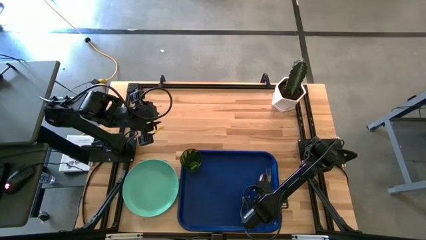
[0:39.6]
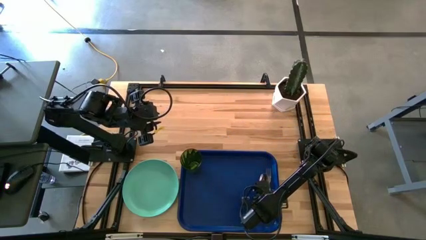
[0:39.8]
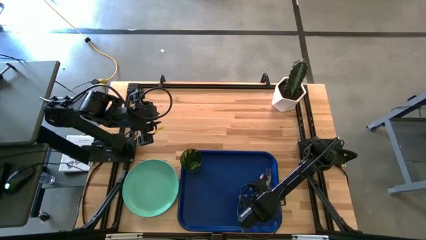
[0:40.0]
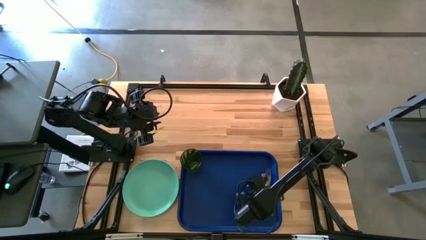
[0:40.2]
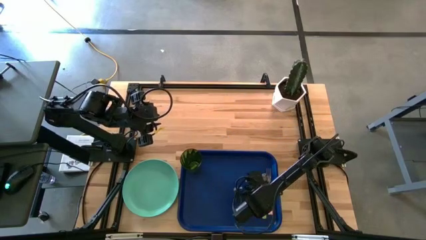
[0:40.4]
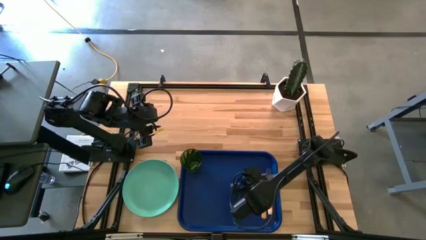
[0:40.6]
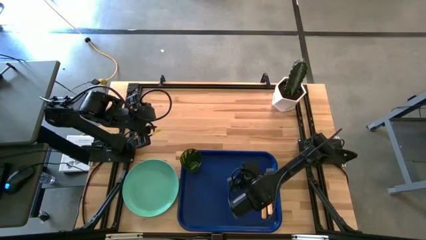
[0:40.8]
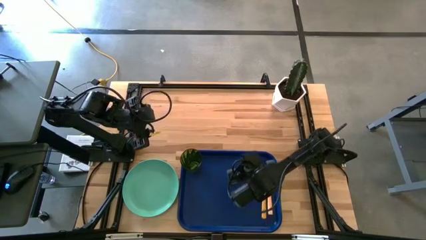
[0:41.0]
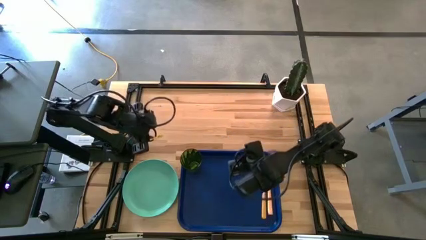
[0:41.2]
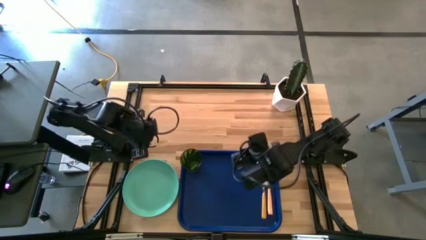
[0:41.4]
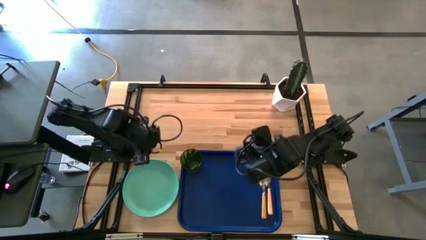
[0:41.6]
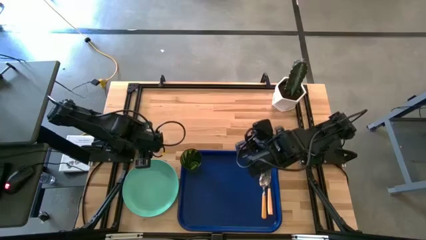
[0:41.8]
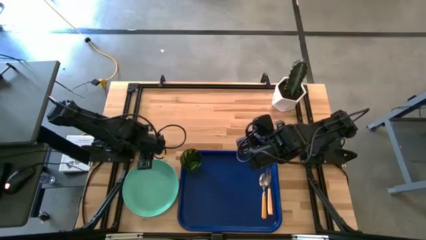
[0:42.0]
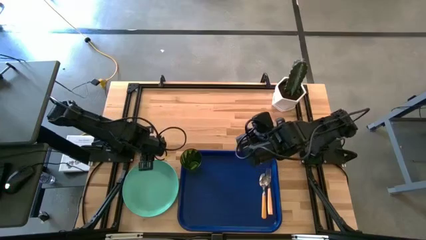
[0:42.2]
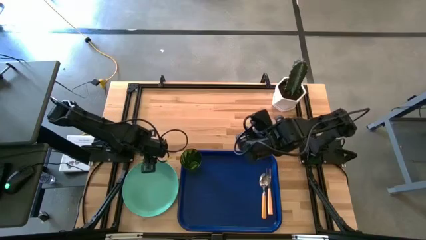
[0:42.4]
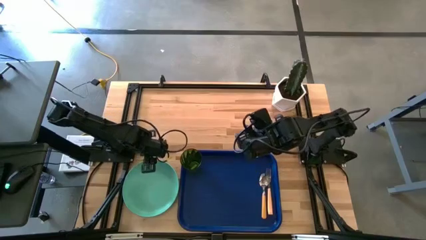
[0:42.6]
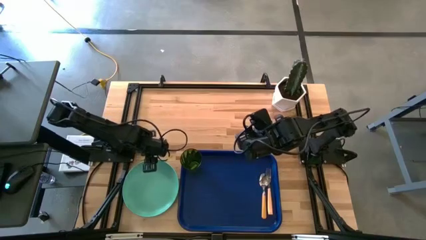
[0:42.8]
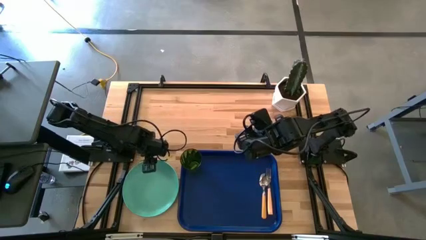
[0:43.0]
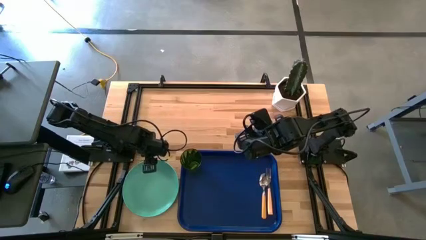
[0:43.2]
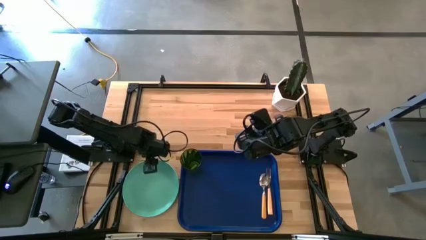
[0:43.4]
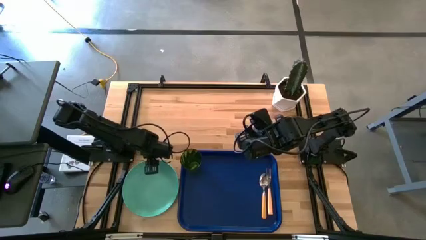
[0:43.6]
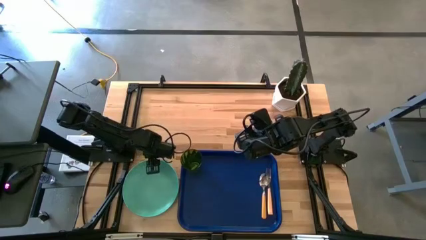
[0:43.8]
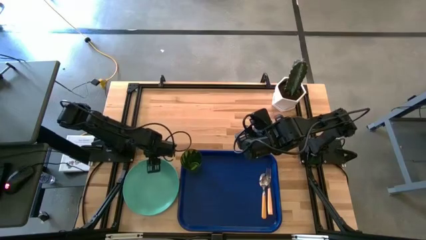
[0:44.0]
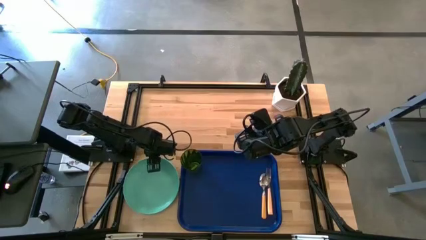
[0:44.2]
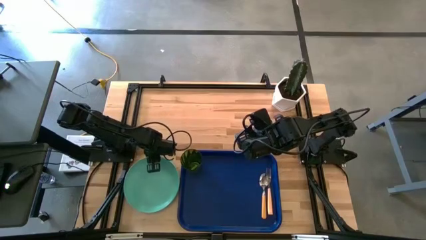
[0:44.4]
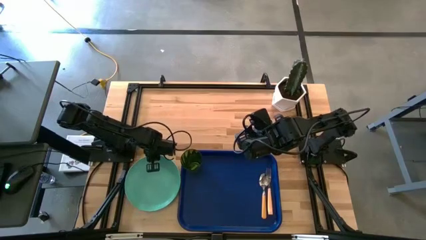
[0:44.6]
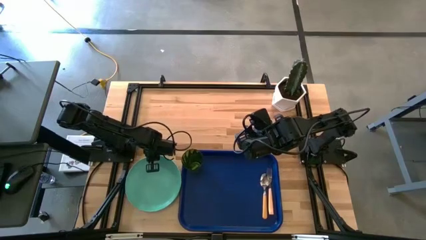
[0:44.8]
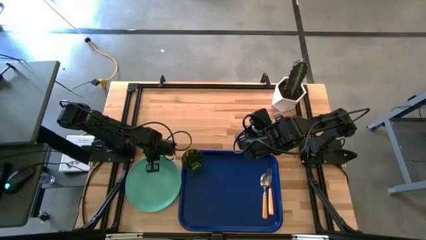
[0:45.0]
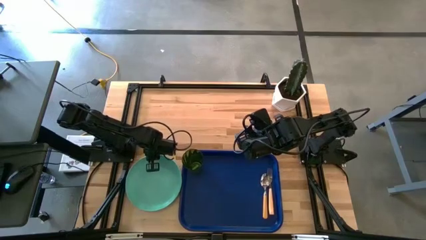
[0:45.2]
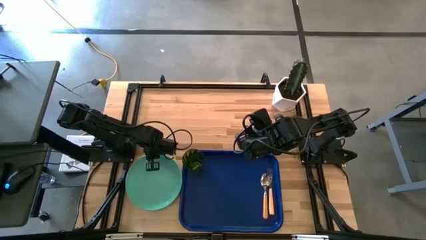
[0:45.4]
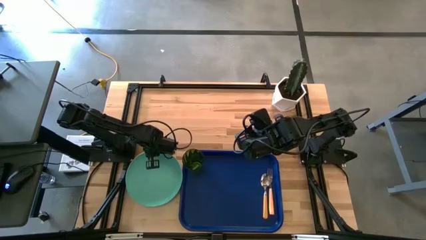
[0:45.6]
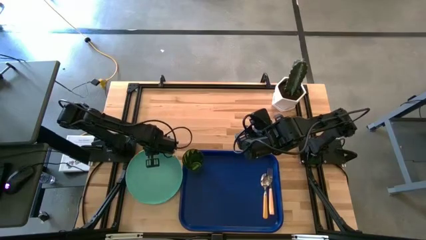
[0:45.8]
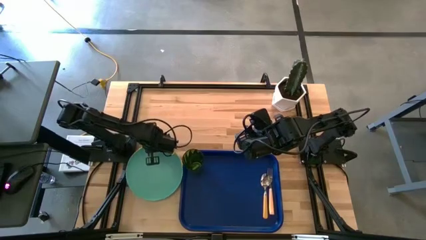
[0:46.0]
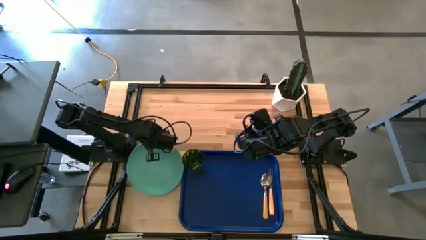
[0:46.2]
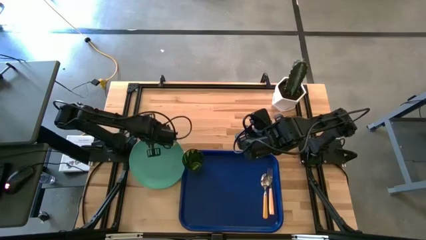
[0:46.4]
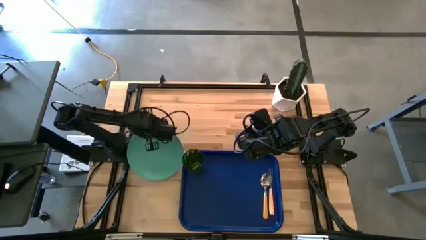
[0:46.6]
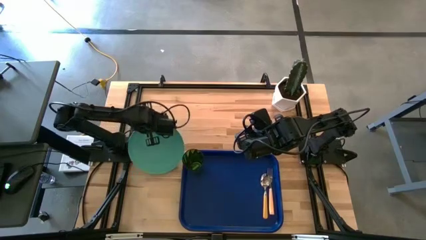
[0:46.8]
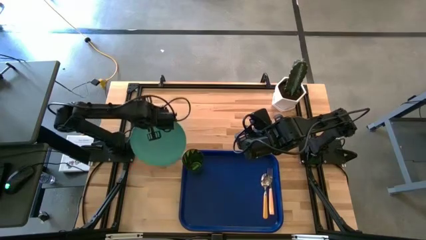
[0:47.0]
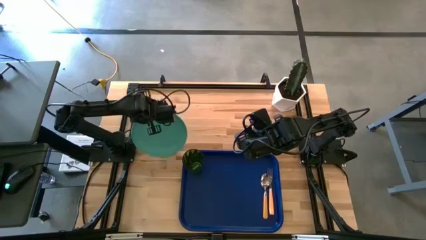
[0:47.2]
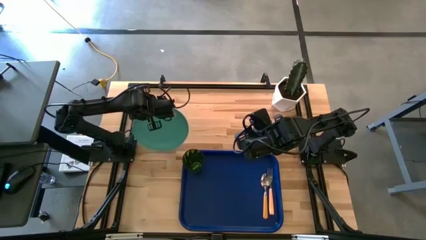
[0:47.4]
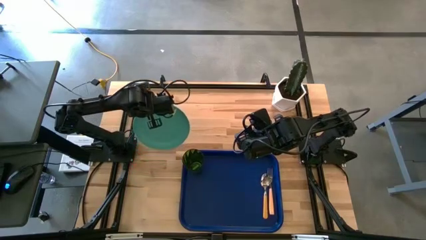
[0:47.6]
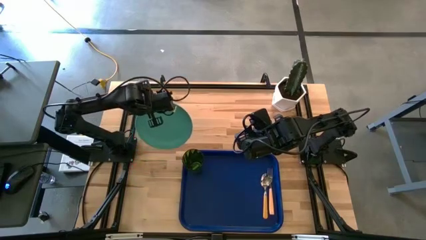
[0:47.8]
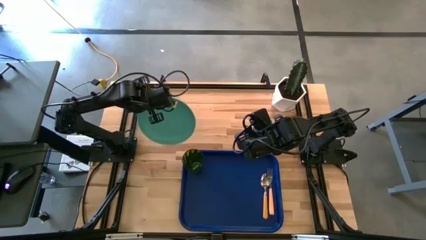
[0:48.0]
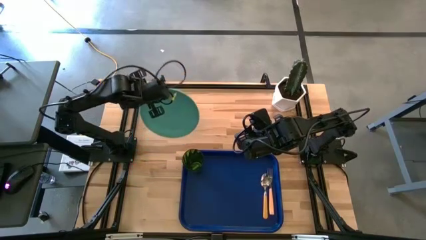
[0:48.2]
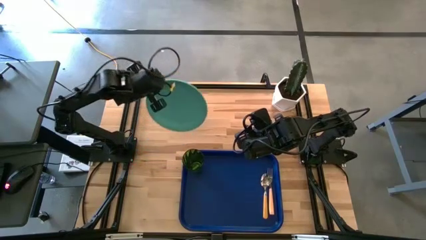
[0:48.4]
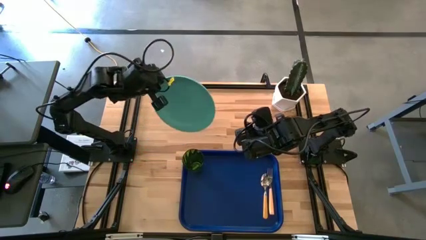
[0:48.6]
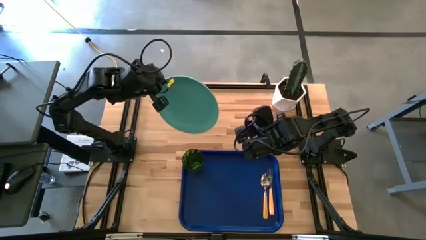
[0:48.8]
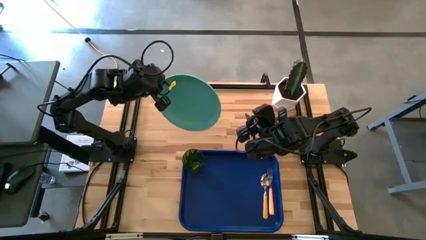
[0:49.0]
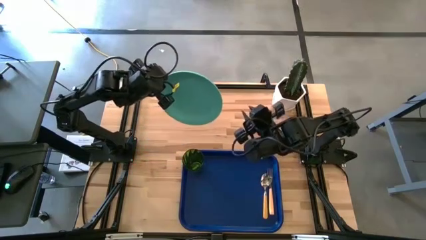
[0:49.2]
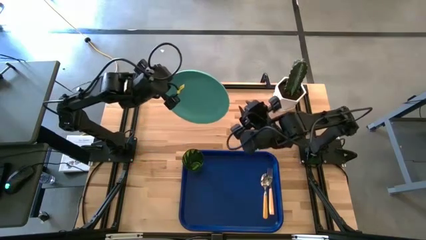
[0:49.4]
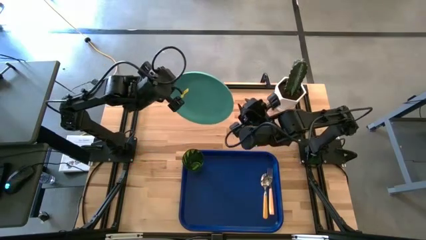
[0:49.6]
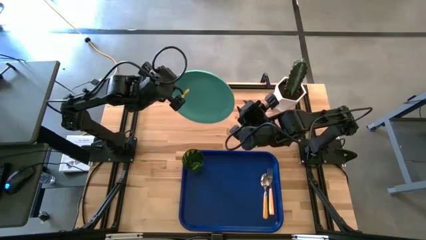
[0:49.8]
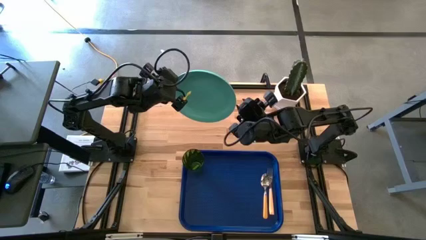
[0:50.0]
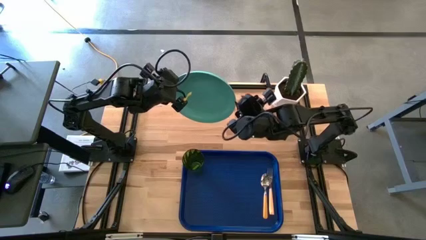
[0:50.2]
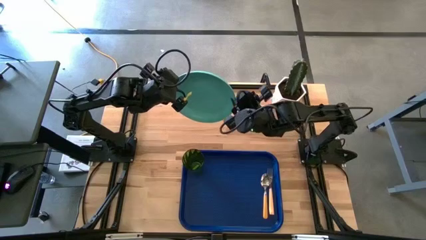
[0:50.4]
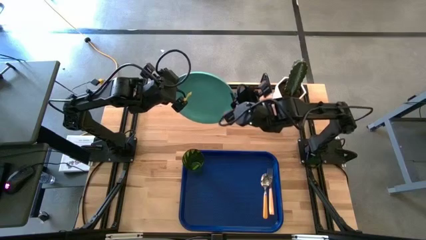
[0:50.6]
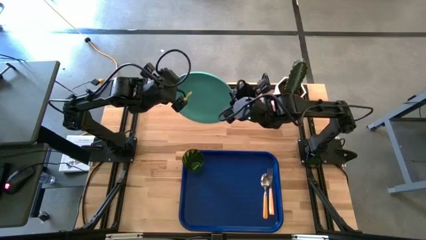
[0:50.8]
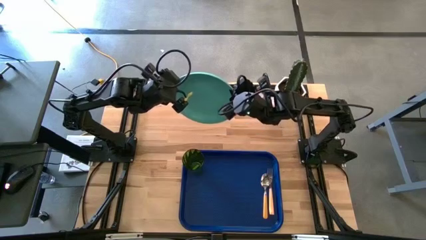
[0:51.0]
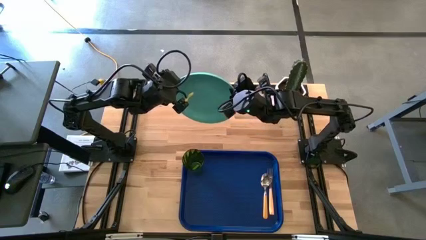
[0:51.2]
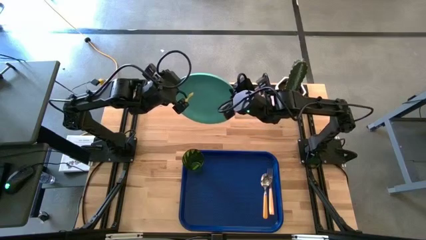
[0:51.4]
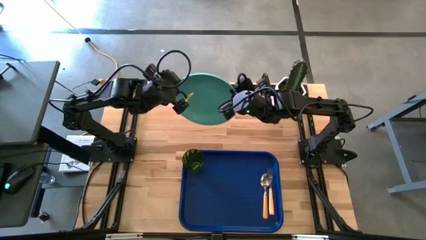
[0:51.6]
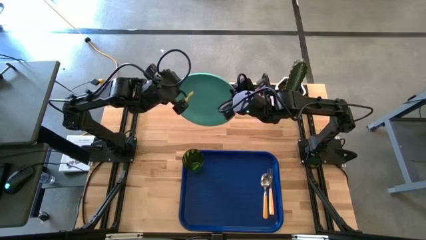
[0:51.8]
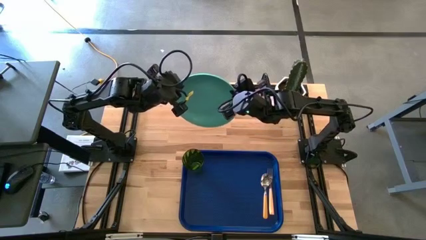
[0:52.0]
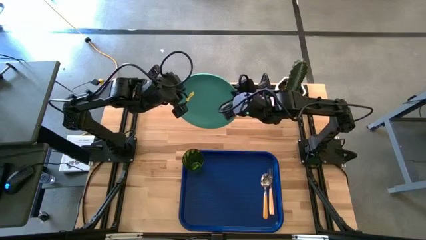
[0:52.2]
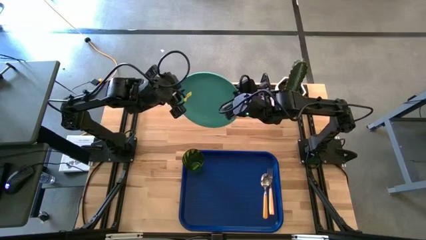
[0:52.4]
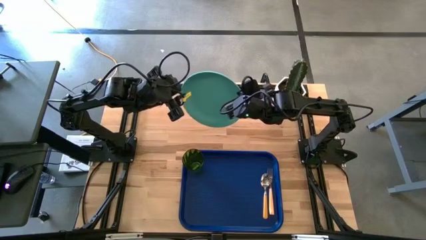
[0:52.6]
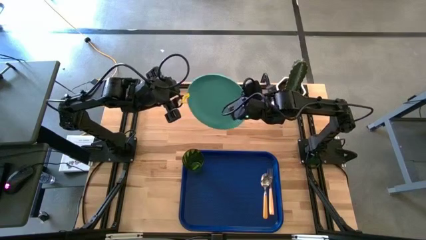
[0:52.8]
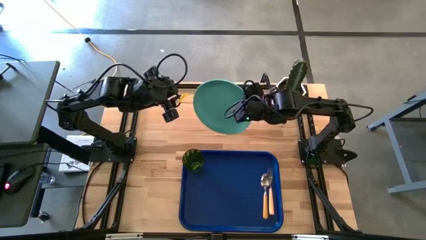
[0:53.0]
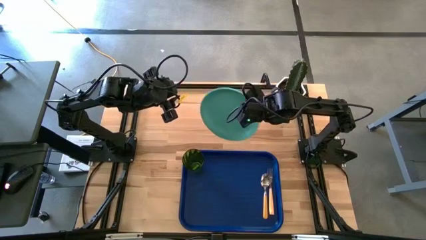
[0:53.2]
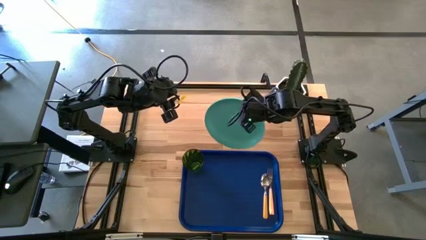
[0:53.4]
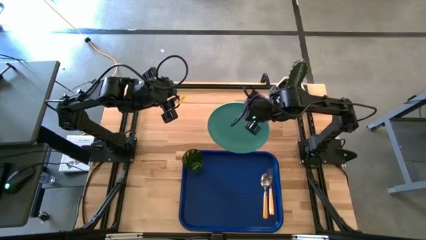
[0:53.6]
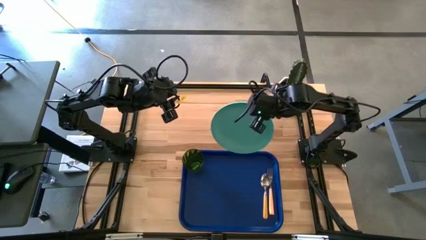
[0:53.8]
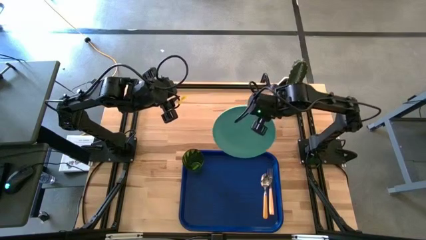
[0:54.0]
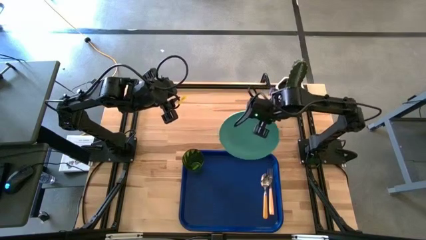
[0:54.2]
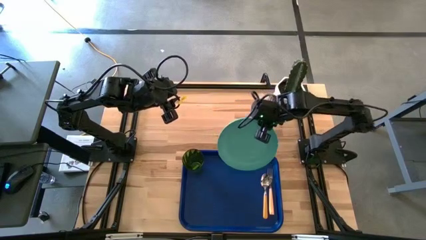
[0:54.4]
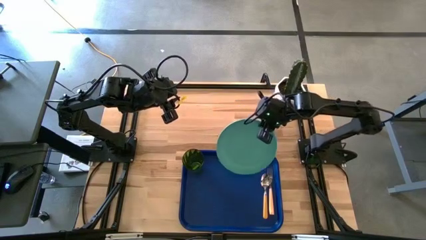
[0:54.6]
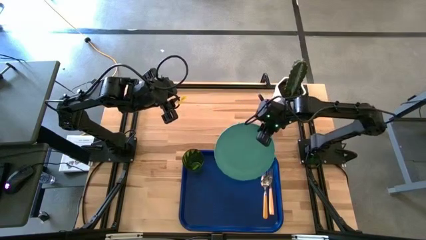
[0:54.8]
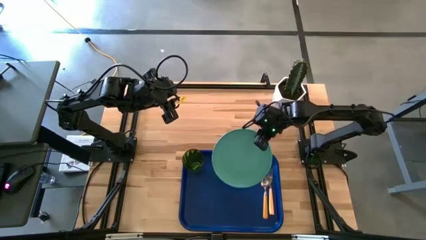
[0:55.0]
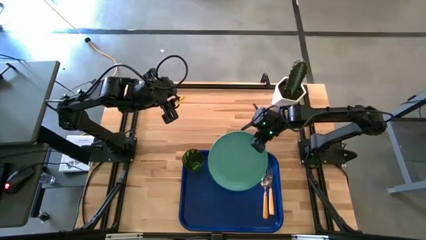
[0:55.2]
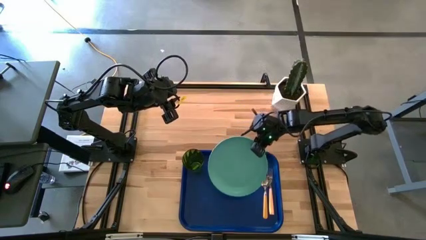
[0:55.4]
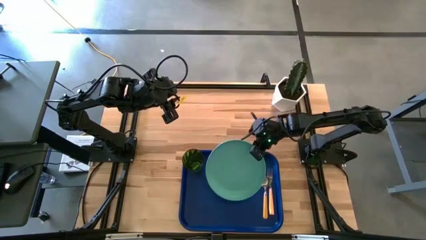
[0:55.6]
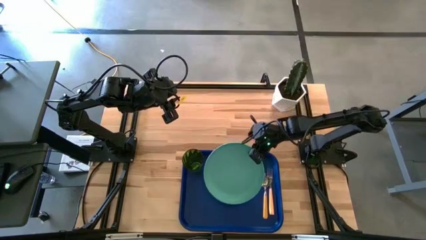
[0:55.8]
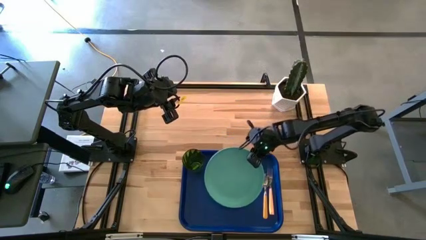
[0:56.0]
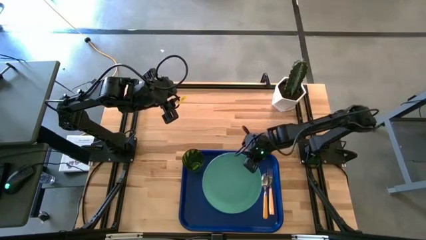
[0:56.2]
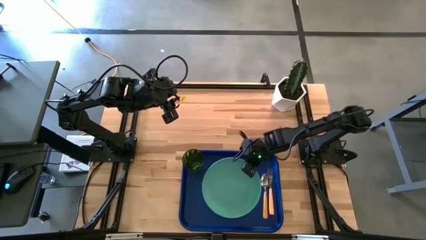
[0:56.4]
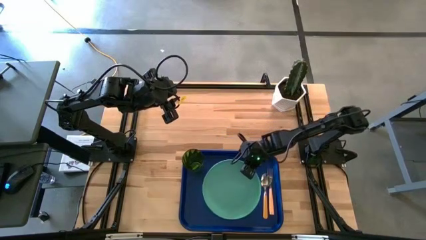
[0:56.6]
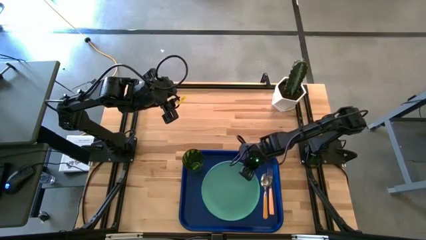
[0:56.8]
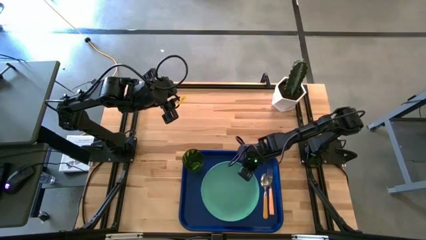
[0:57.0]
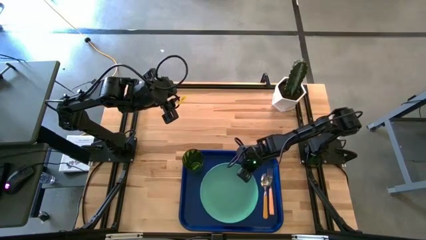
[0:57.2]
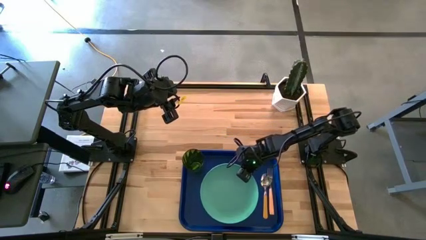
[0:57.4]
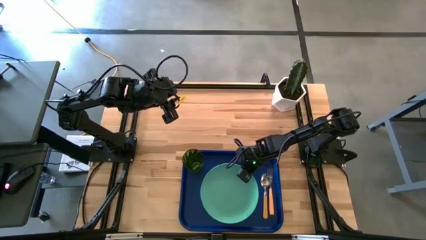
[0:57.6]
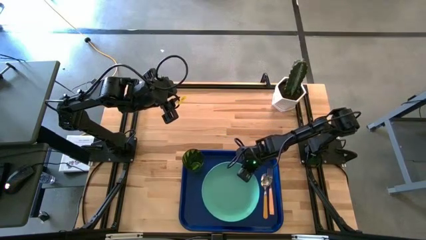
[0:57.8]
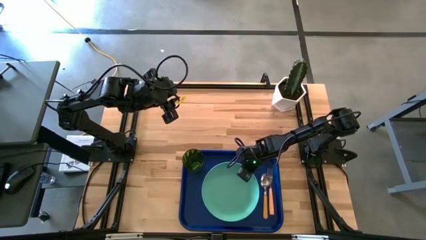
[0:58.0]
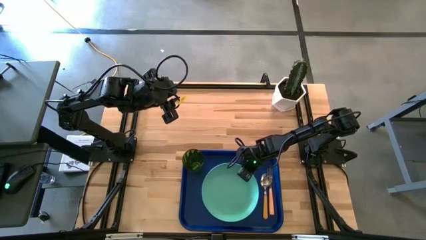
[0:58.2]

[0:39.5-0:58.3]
Task: Pick and place plate/cup/fork/spoon on tray
Put the green plate on the blue tray to the left of the yellow spoon
